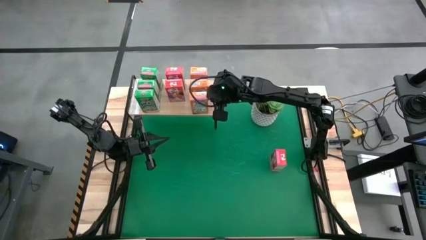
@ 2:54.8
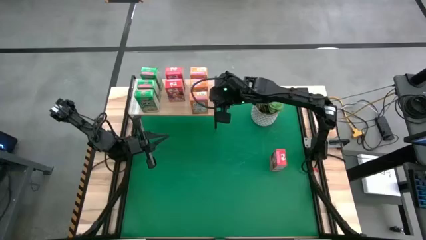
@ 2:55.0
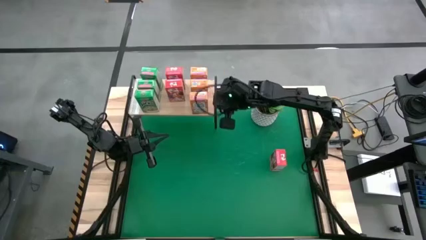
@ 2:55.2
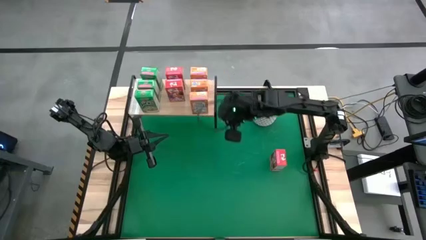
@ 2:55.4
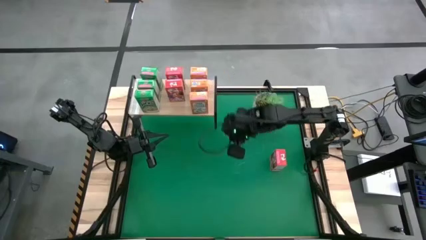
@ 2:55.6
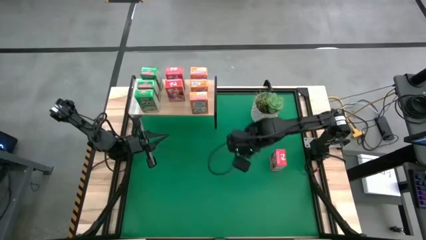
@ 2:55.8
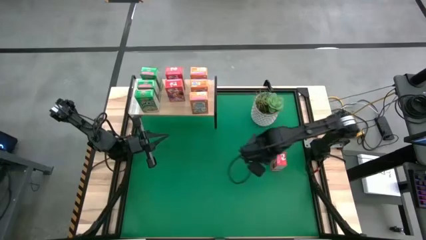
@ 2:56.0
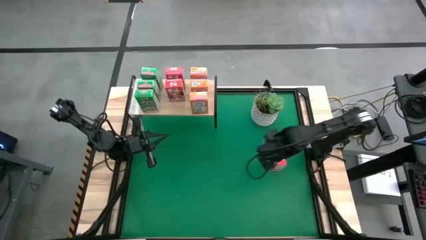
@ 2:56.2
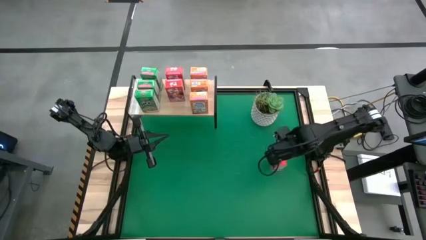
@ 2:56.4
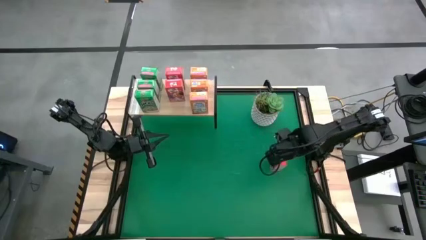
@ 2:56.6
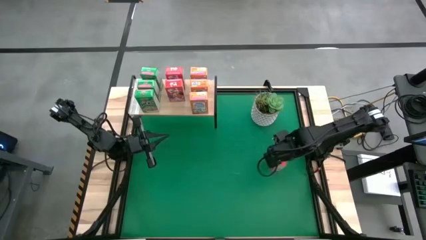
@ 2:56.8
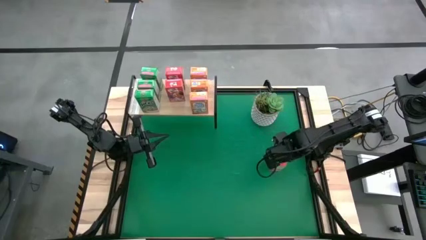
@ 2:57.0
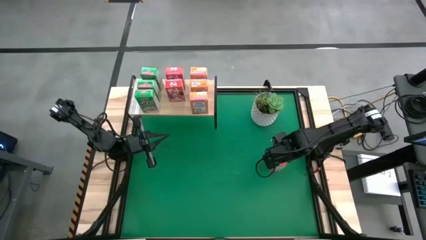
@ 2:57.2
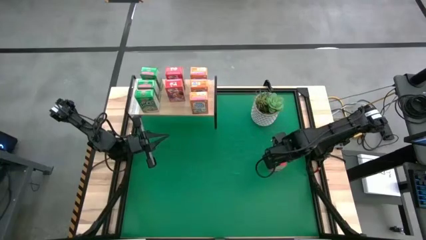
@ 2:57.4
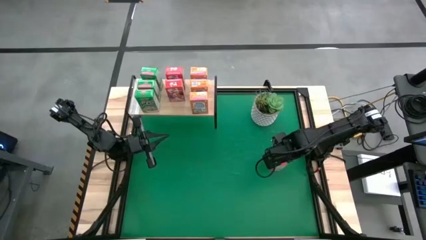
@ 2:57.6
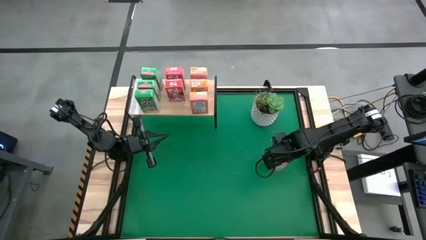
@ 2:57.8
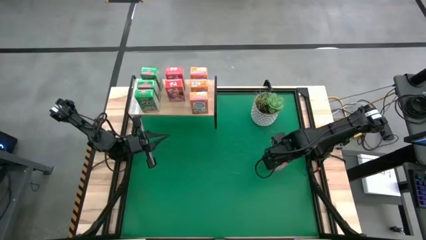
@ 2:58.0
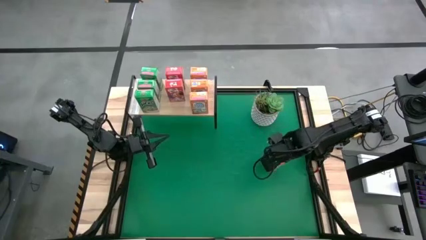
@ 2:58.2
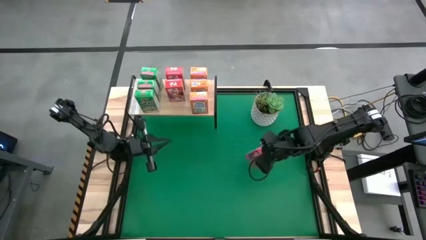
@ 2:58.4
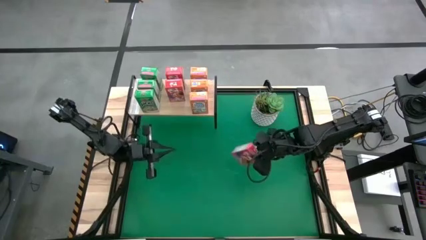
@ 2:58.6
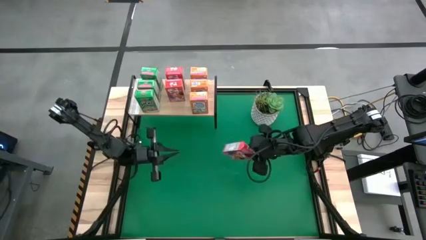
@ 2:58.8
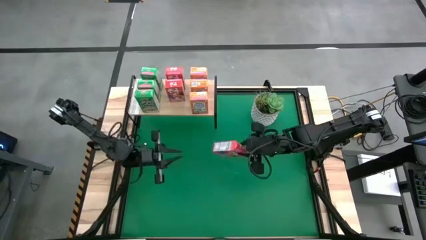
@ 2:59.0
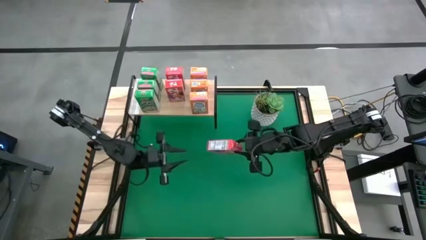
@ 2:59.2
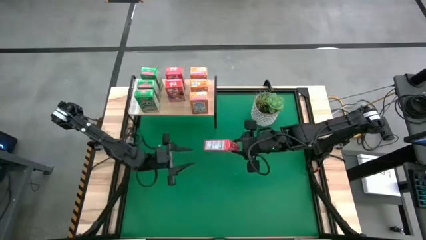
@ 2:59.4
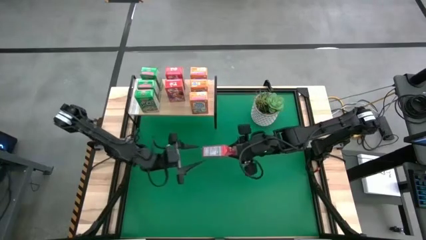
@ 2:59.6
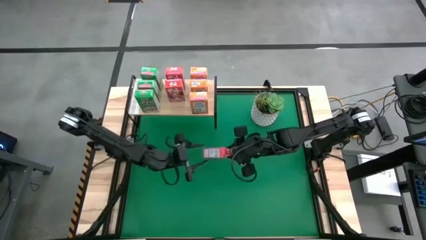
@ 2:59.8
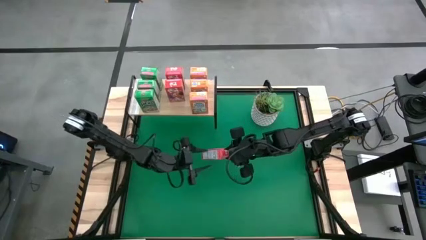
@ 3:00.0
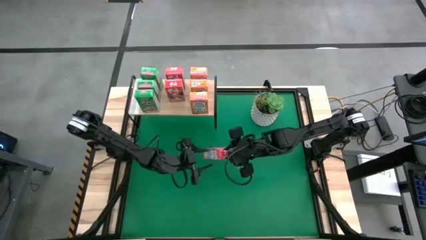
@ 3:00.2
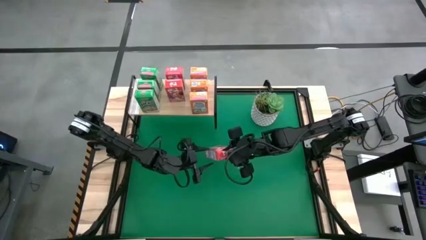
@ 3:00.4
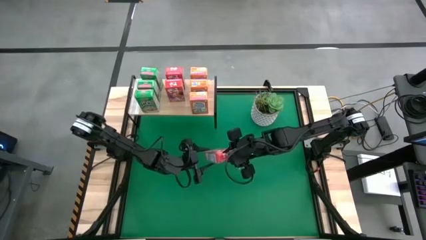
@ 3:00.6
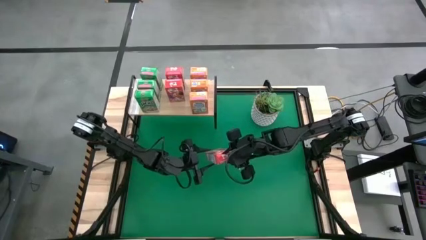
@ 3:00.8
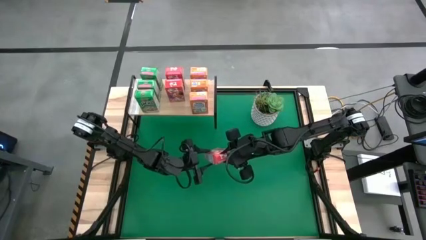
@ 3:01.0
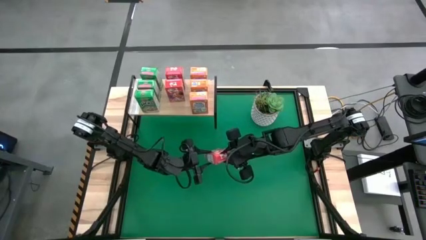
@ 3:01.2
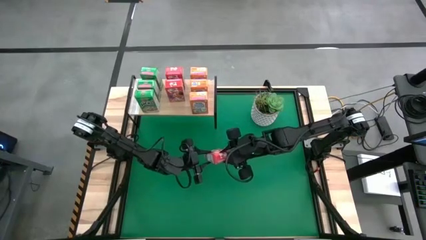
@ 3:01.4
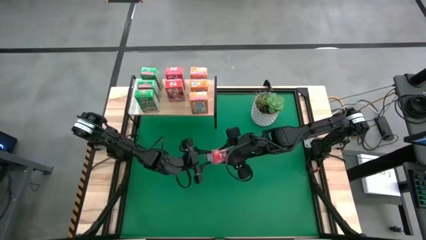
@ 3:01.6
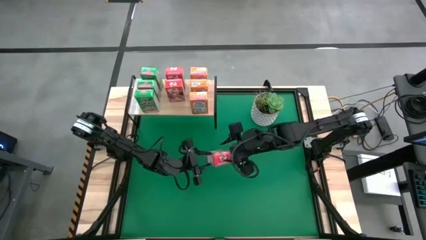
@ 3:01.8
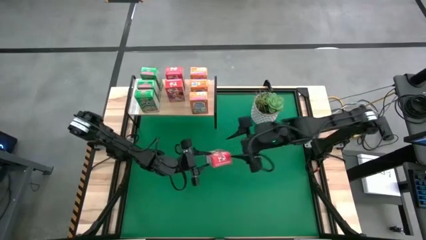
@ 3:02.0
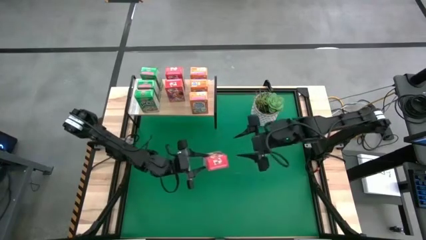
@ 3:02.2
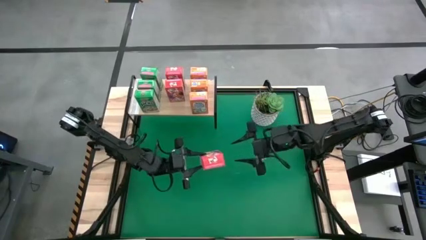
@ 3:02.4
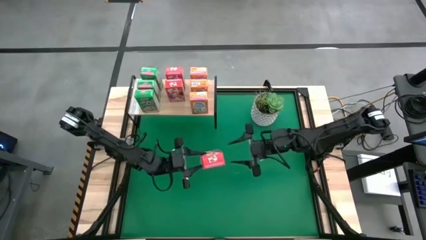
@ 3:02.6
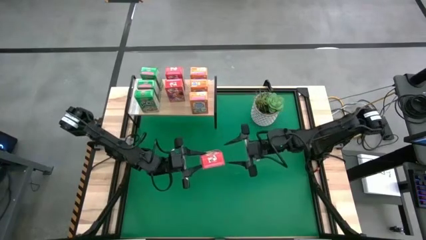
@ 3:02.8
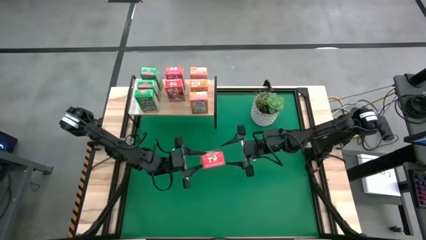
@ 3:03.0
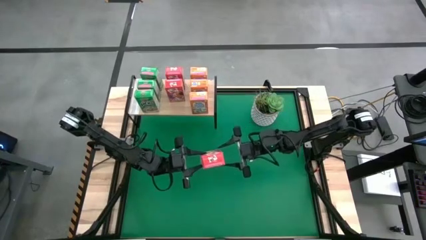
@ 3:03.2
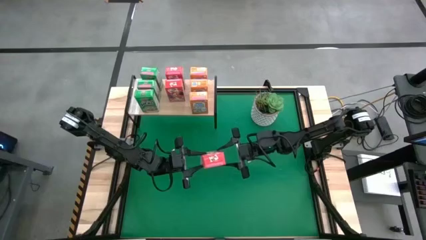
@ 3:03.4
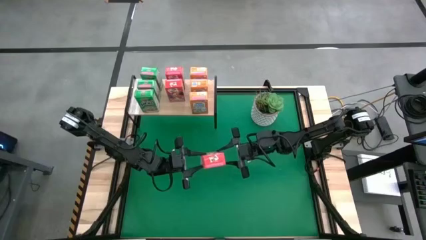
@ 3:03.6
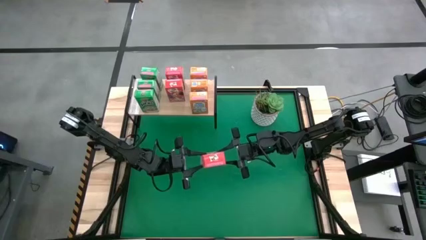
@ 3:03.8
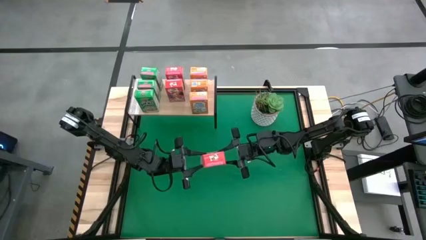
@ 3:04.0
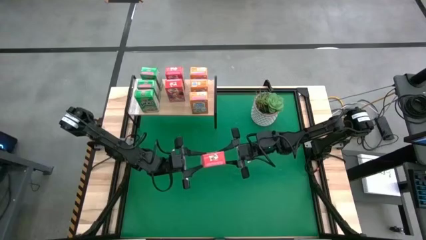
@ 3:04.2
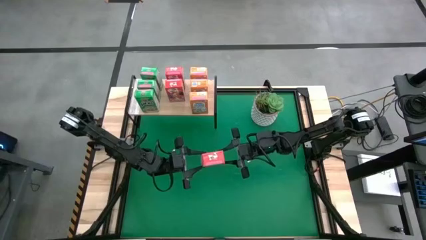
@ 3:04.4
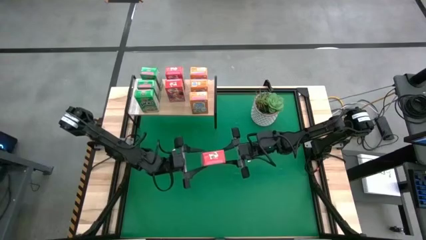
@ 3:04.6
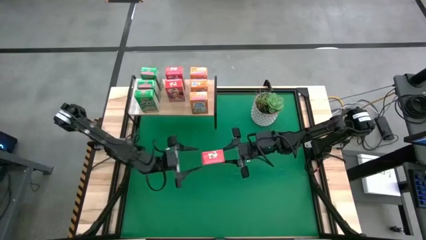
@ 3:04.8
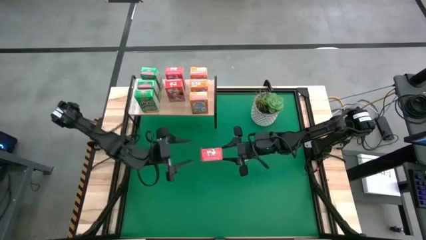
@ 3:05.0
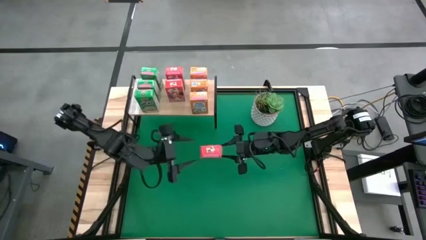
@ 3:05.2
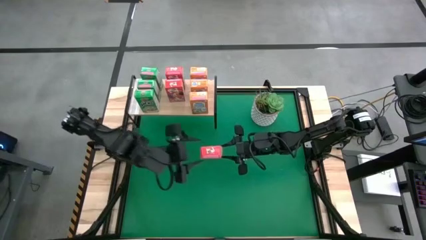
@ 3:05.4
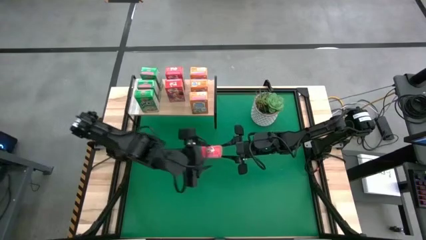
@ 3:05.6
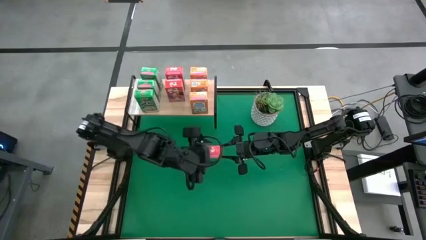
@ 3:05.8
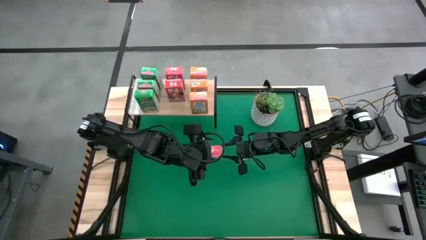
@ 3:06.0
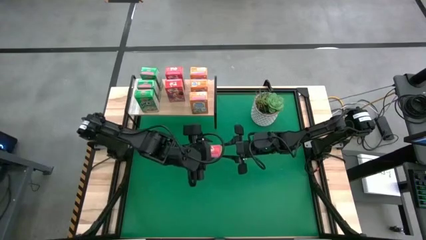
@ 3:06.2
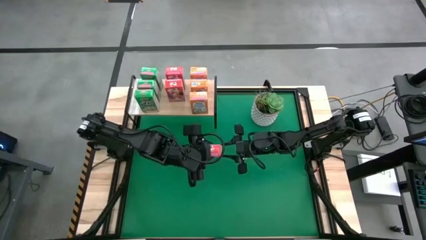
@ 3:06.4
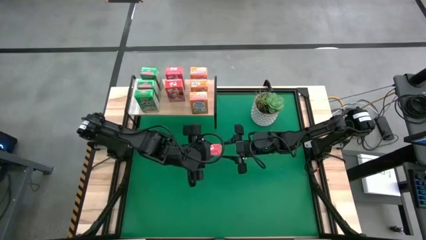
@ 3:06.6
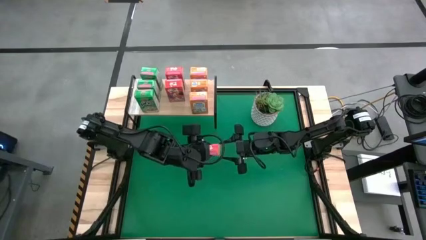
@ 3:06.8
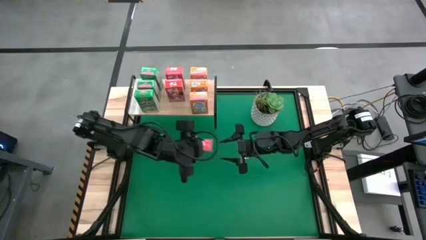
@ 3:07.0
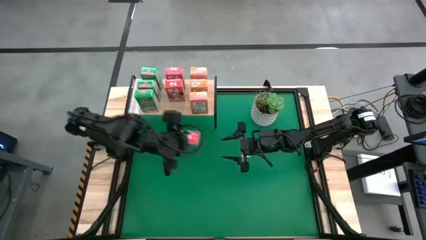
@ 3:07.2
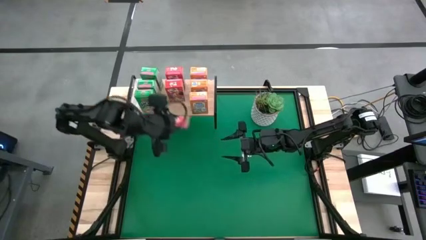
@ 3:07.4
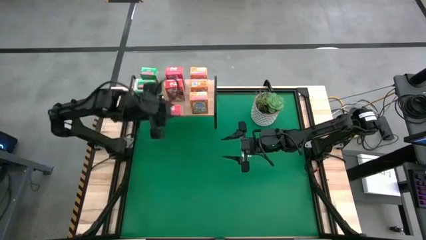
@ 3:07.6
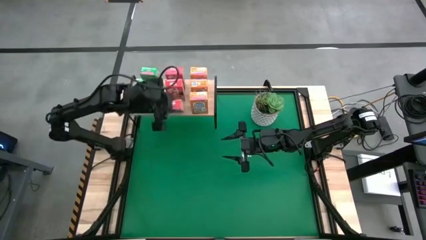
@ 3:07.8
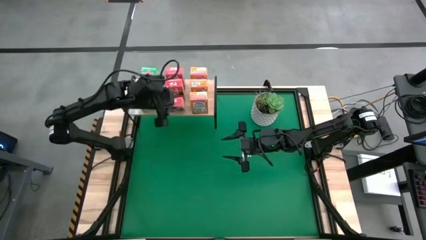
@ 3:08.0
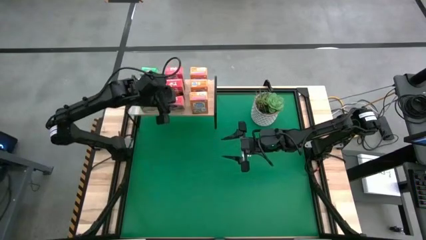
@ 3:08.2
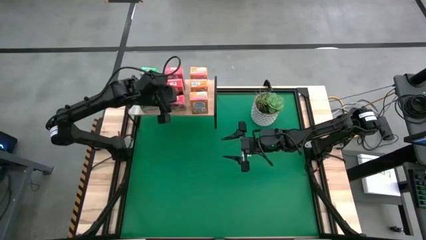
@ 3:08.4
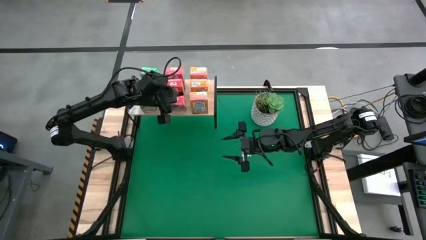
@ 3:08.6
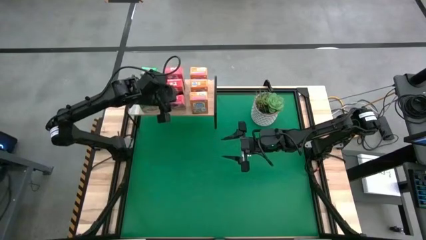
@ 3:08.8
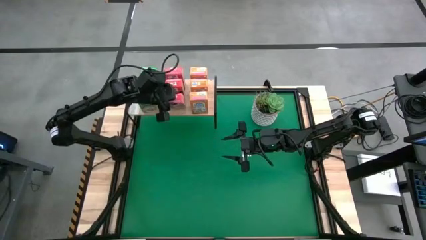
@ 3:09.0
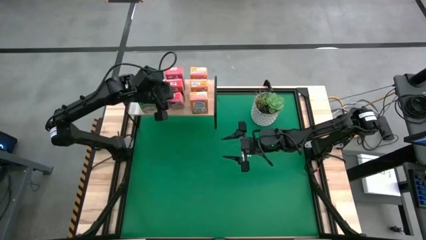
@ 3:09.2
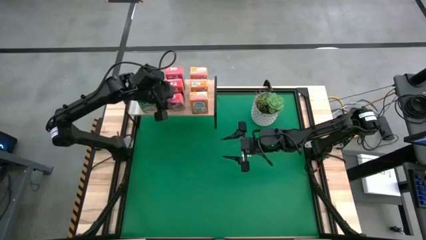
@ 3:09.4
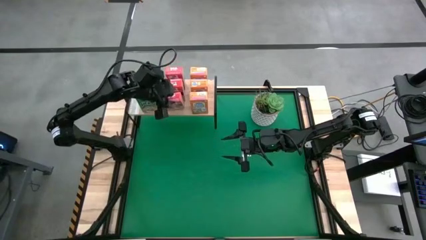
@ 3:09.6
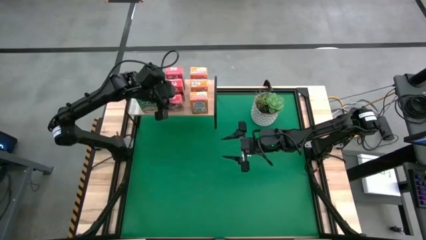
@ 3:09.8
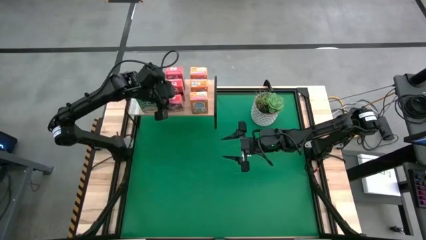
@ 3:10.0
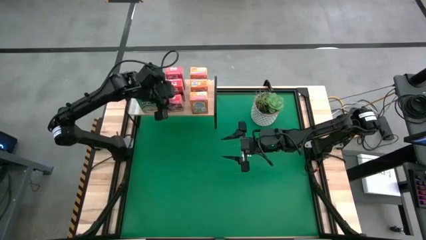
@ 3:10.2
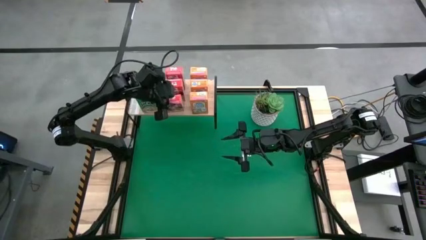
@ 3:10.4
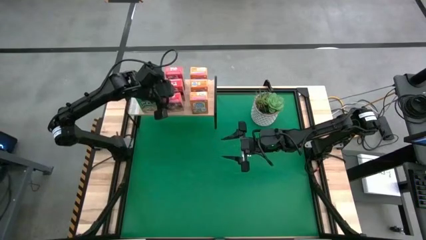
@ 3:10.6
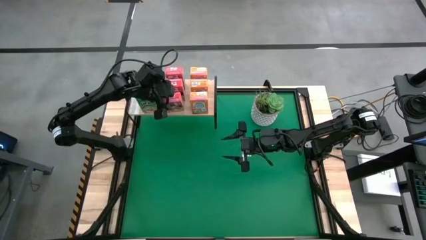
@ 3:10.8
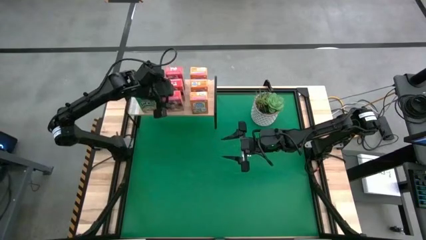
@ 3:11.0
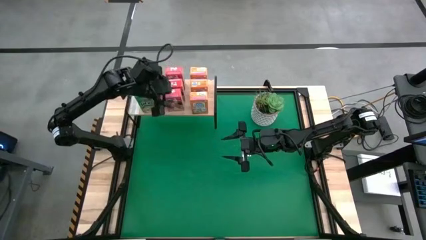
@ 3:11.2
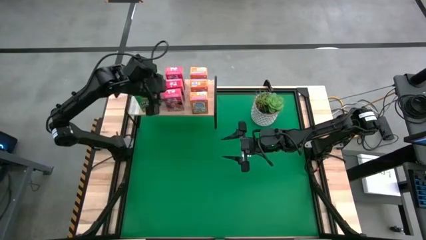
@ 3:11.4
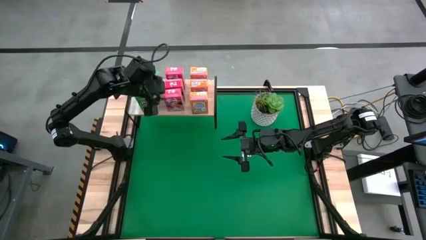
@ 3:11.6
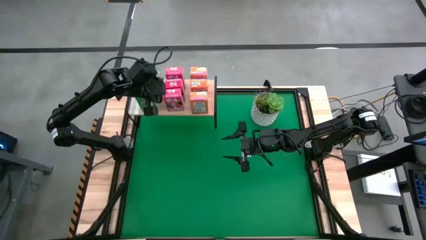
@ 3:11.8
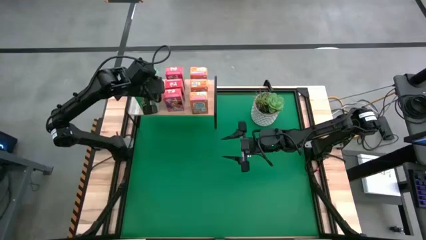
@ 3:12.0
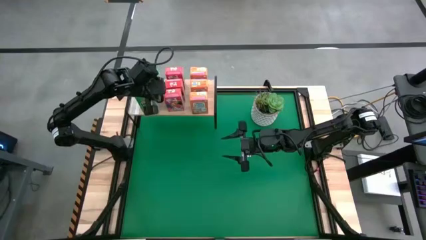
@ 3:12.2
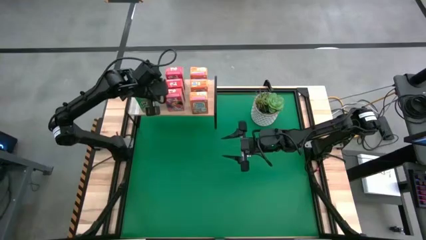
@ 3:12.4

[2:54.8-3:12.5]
Task: Stack cereal on shelf
Put the red cereal box on the shelf aligned with other red cereal boxes
